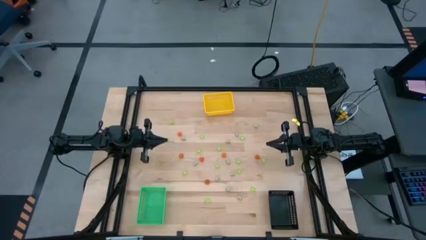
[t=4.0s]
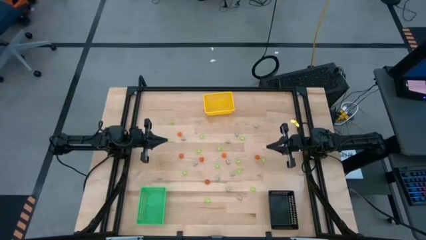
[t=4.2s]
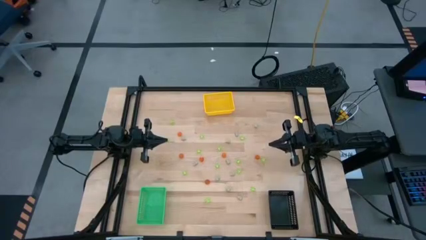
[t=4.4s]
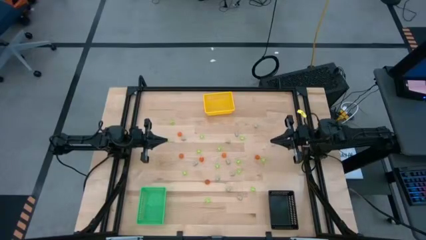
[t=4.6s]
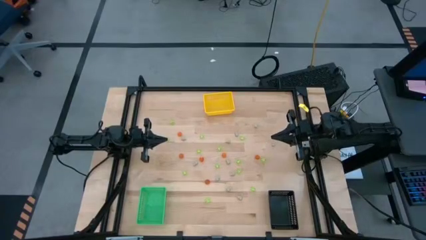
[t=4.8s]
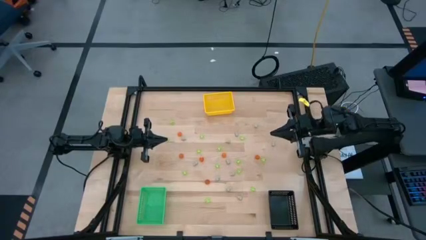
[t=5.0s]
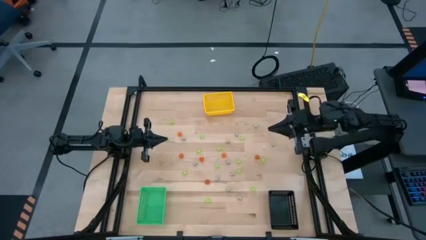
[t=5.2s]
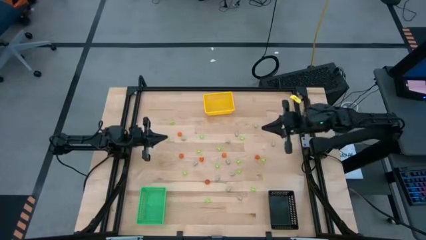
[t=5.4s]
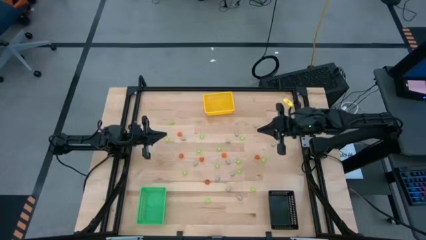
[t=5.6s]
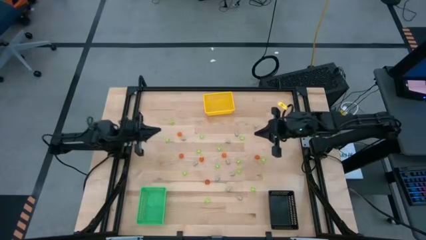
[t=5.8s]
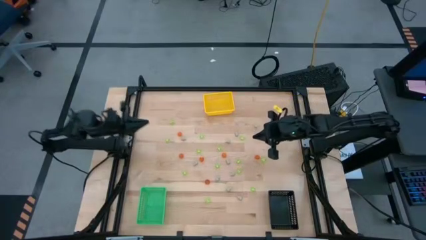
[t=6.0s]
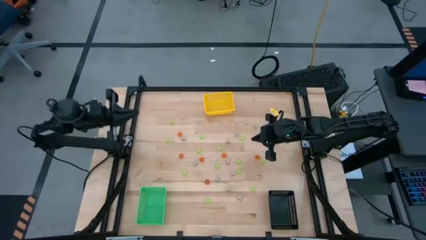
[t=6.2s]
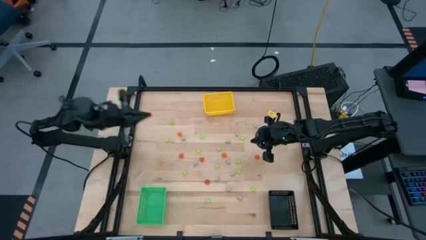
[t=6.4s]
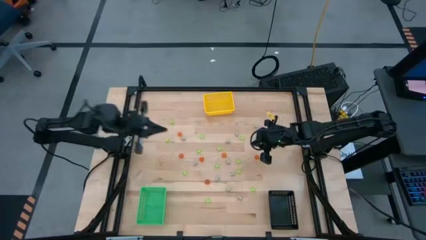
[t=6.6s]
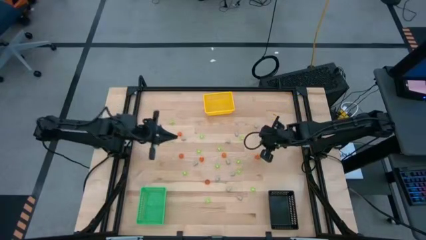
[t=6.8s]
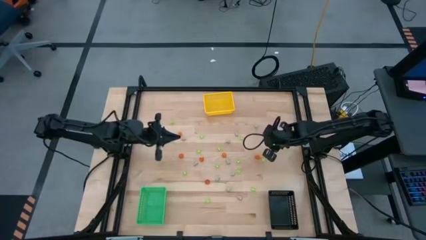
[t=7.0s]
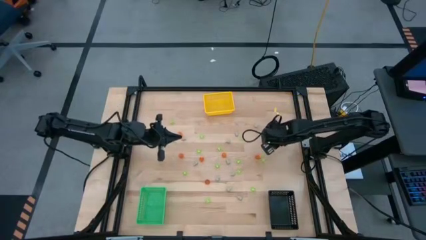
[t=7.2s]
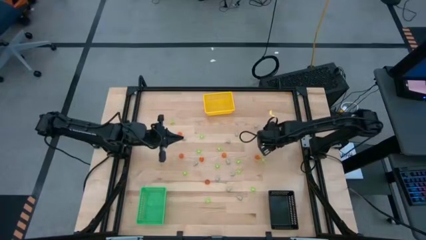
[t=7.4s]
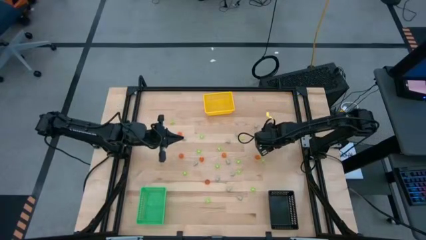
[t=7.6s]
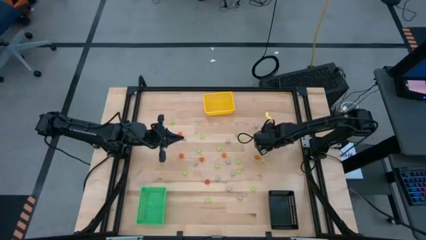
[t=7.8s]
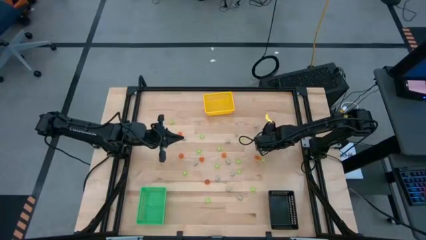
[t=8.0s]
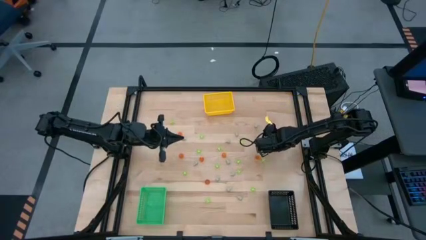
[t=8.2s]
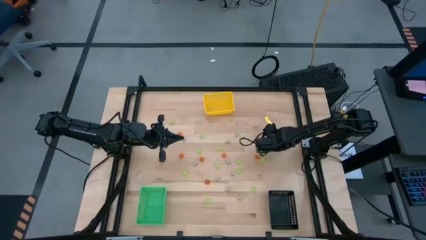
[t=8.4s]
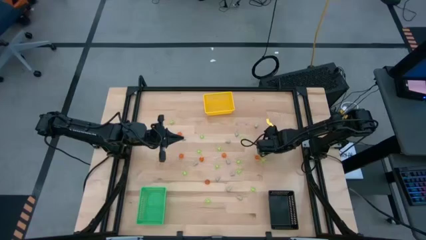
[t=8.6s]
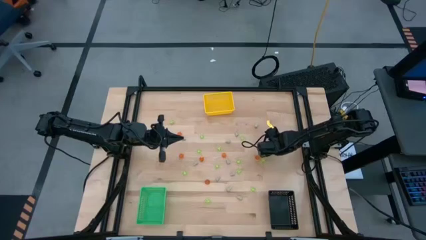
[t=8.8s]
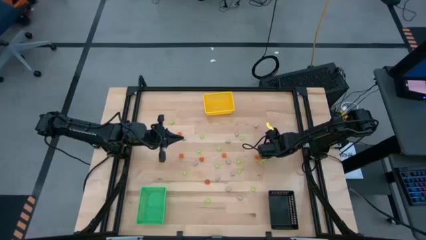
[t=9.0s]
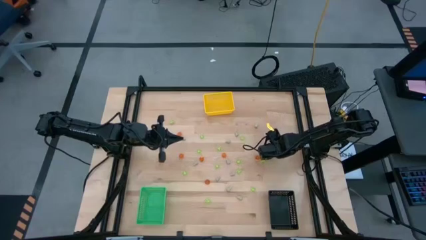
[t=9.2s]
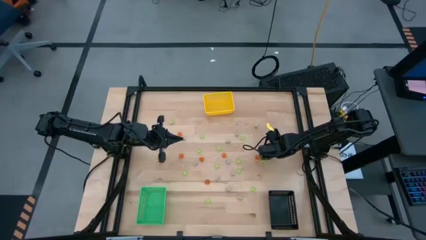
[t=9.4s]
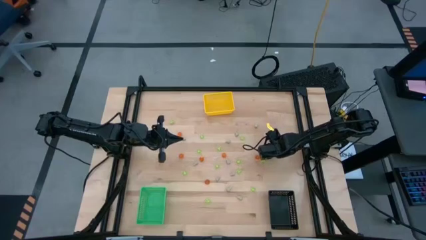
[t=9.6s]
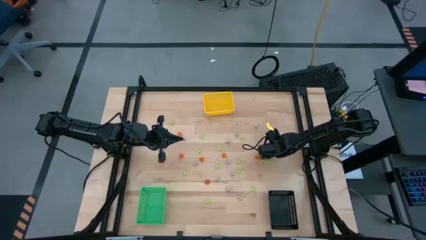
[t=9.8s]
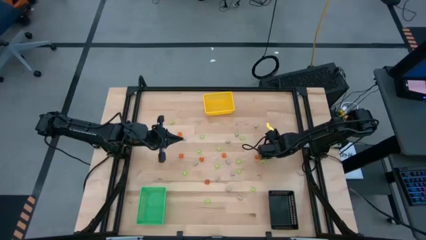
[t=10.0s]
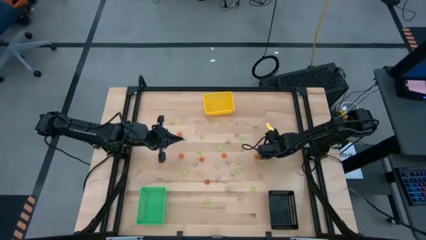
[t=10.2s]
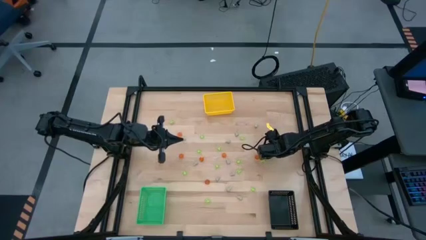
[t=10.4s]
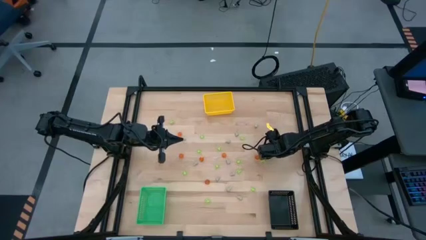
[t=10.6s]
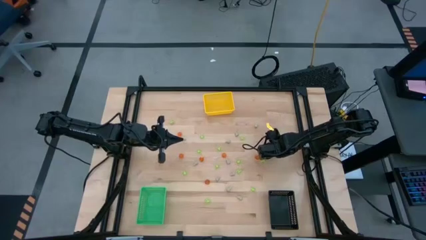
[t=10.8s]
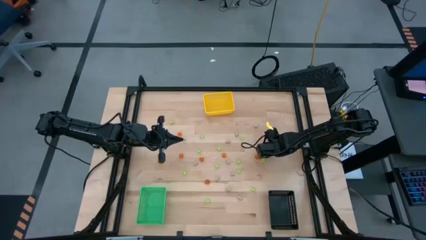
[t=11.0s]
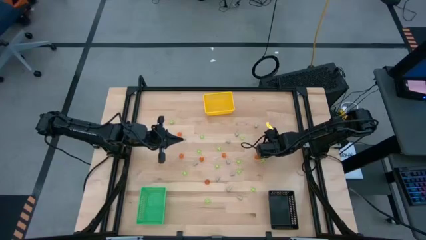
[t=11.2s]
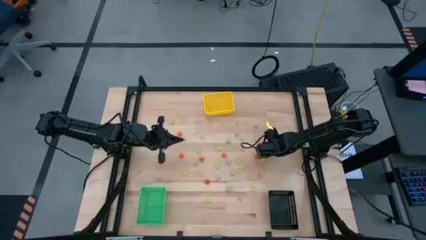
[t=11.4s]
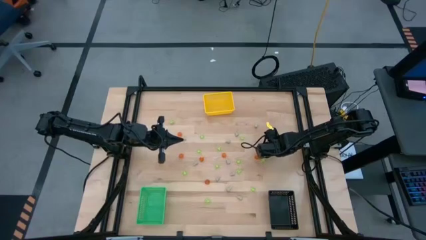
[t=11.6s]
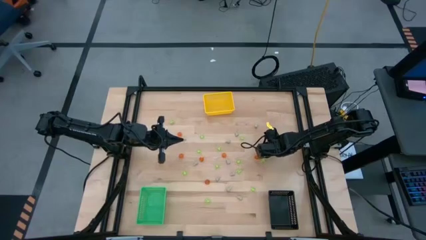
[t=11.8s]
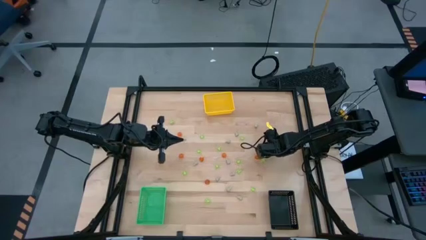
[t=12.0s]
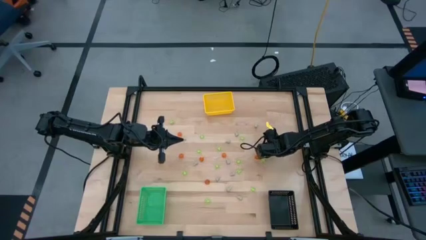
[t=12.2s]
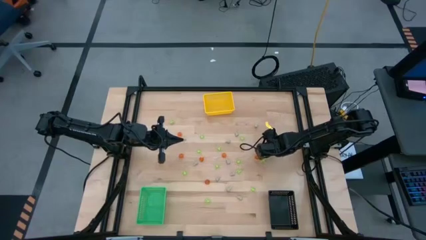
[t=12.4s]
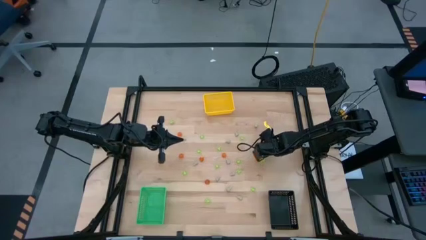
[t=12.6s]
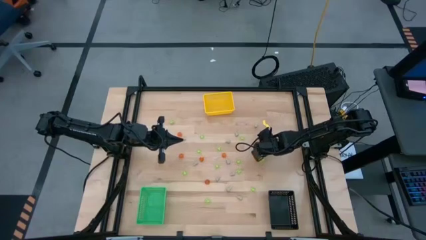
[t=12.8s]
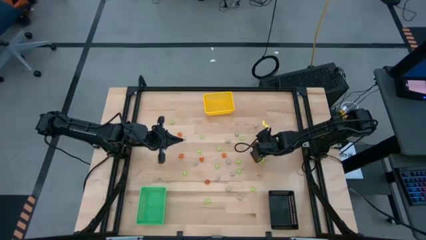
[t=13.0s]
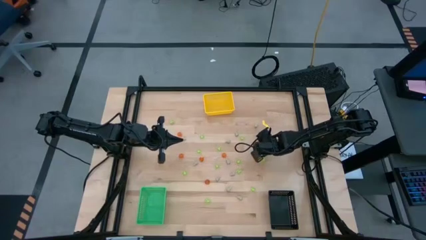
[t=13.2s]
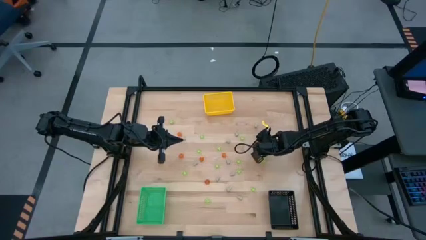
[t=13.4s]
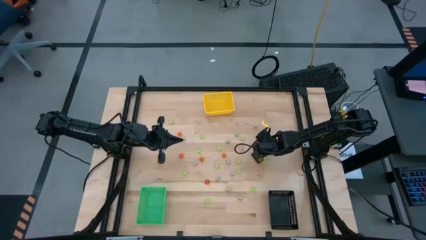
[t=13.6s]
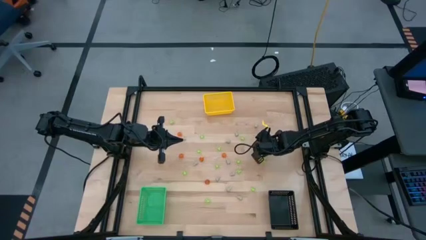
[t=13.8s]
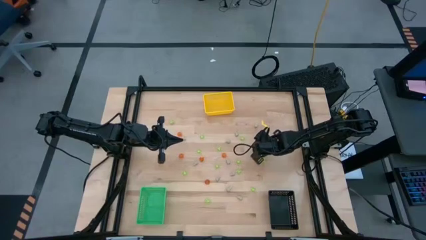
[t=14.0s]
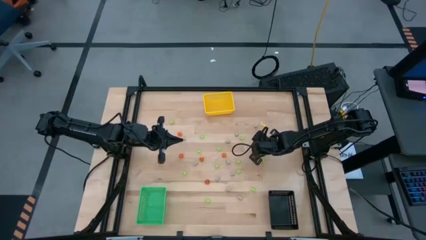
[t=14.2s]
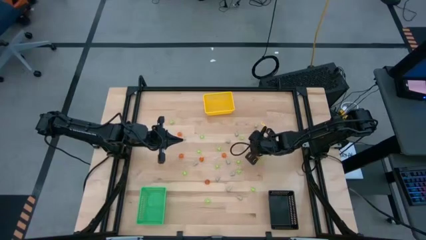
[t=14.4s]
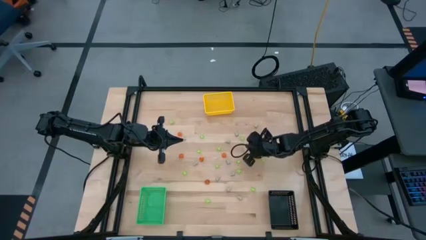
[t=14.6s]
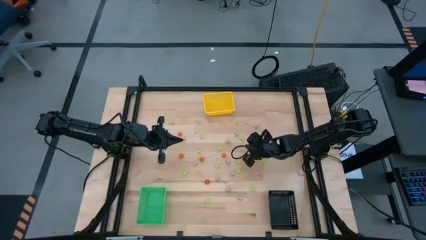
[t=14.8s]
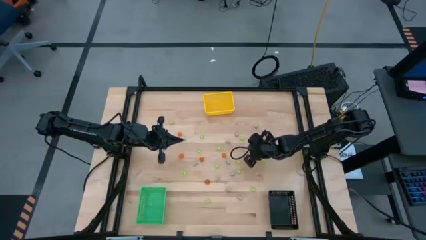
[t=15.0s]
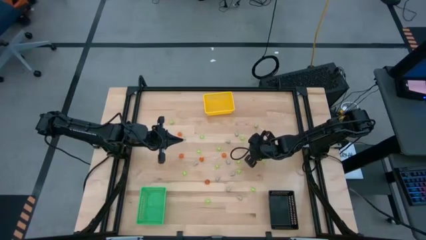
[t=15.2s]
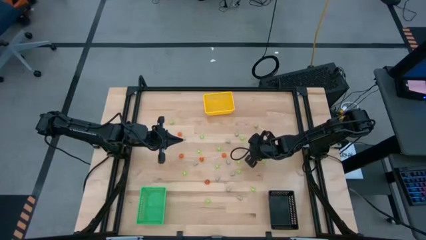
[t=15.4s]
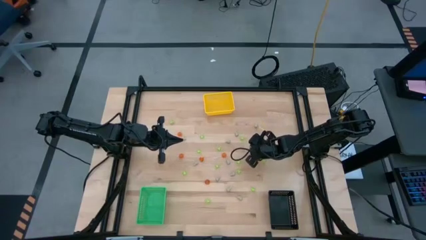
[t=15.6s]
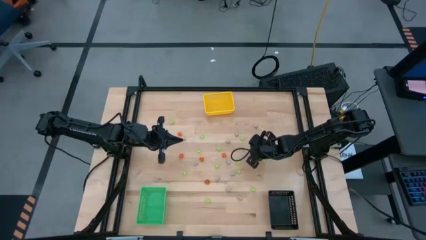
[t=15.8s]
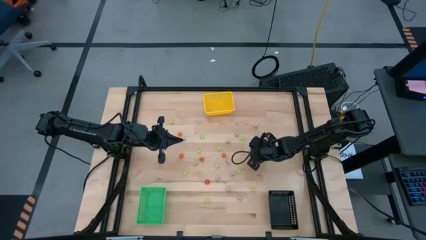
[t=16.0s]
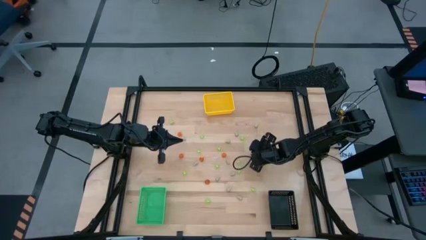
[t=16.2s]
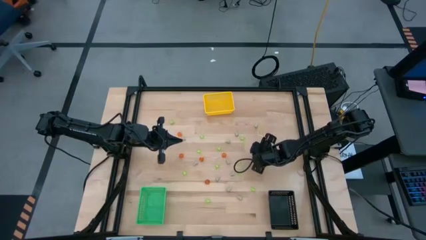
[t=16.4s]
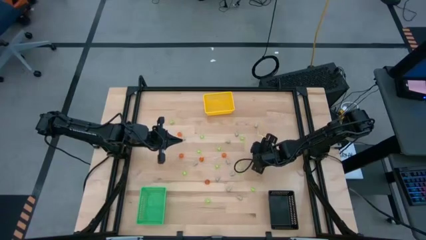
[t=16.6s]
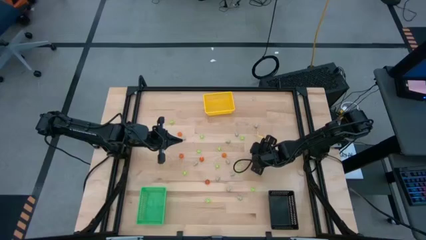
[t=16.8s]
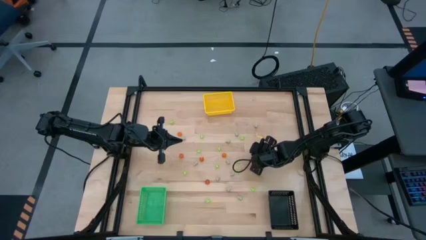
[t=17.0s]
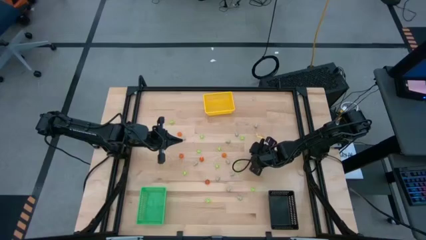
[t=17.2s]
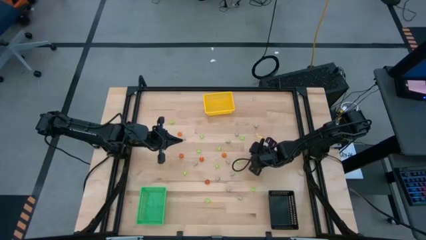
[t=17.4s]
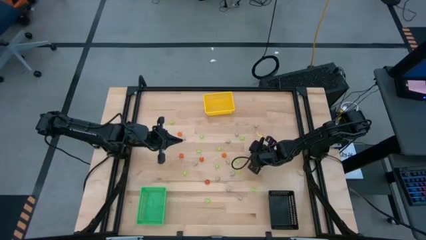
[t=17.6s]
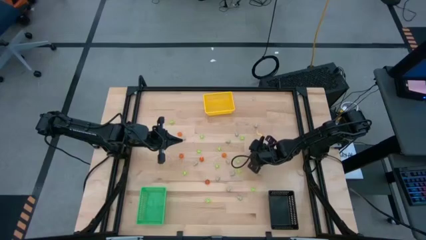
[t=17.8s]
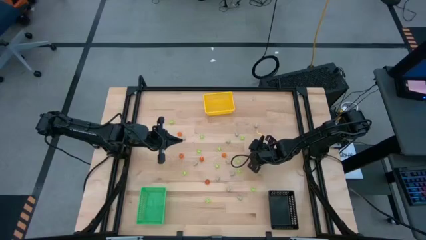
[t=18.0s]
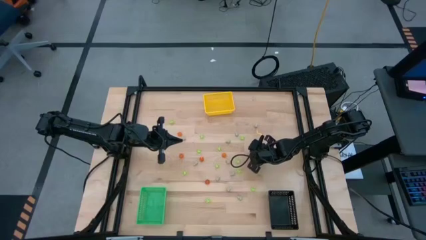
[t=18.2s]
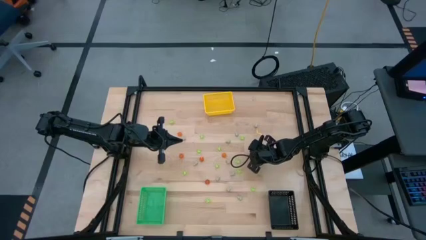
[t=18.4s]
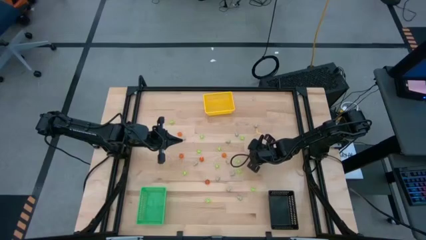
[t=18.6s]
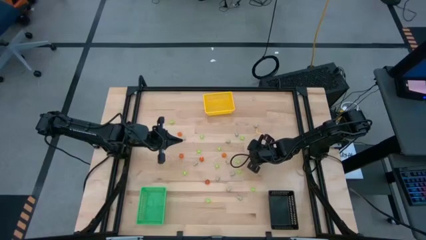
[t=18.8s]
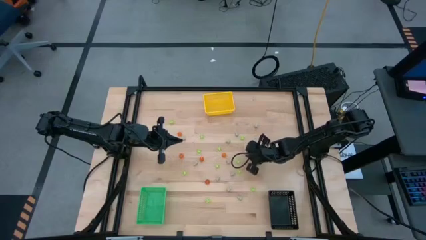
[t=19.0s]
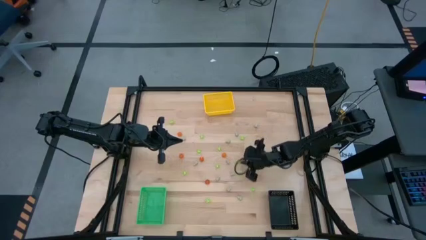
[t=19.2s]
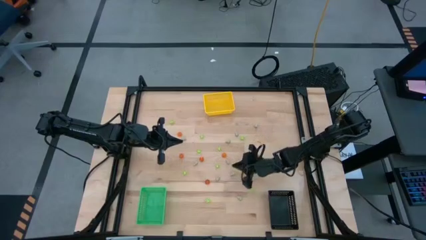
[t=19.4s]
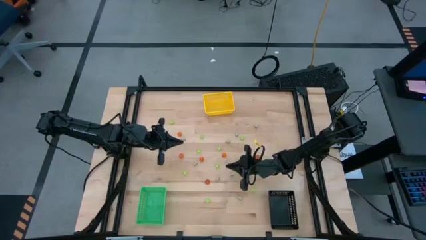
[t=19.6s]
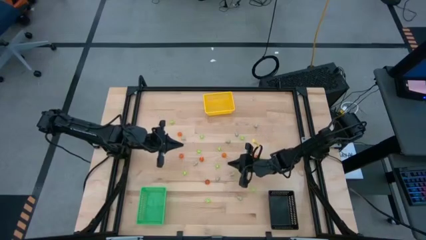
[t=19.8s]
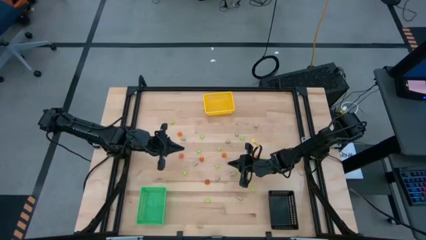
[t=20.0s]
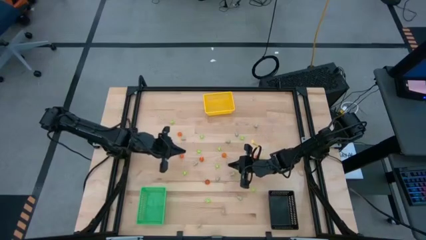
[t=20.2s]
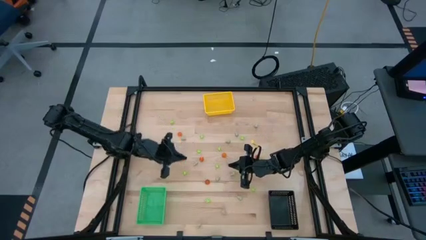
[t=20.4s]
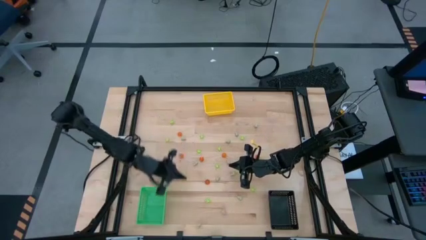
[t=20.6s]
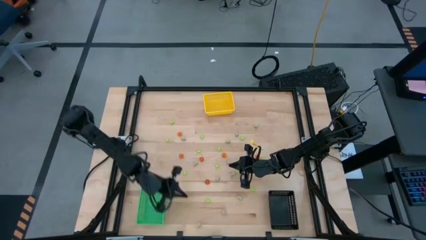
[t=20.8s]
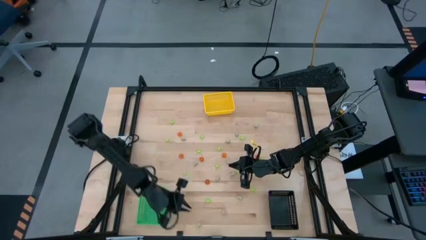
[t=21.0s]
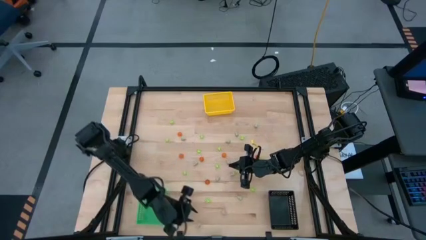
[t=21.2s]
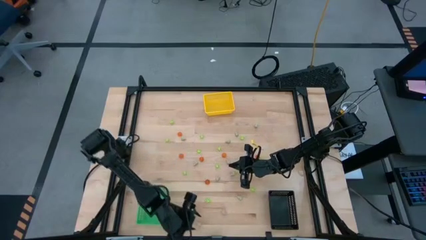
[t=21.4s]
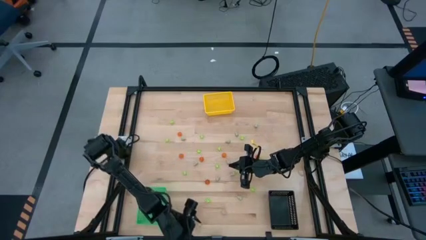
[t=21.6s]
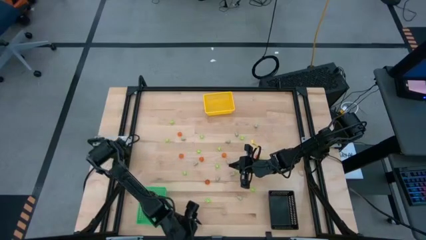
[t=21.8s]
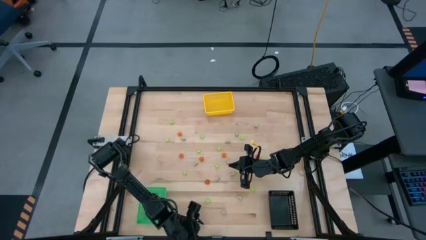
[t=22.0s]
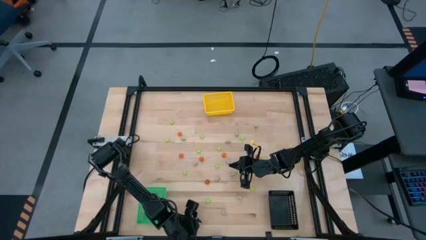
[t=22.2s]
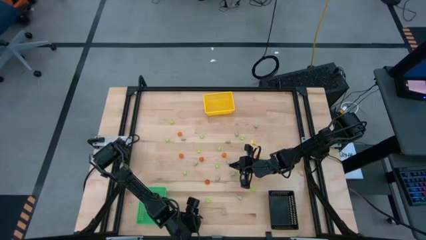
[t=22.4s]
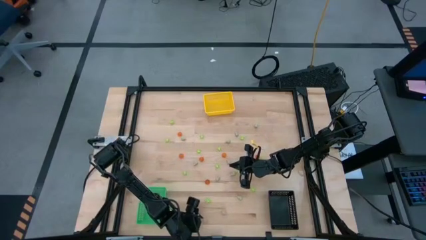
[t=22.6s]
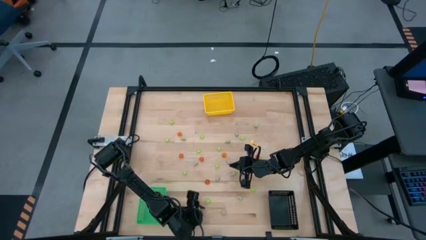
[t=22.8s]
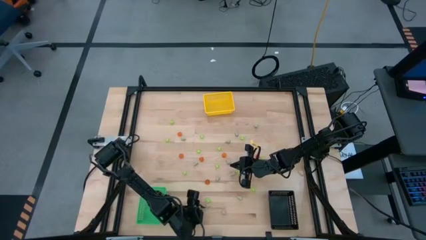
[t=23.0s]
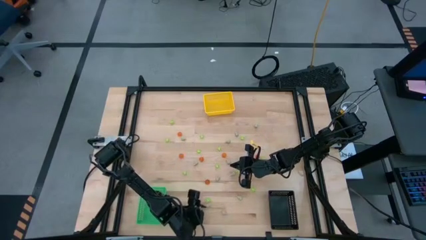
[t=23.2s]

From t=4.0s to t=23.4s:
Task: Sort Halloween decoration
Put the white skull toy into the green bin
